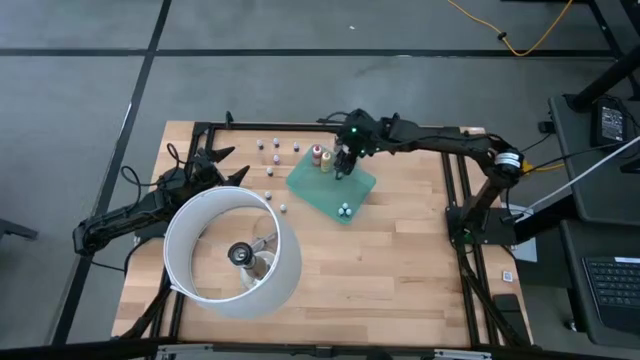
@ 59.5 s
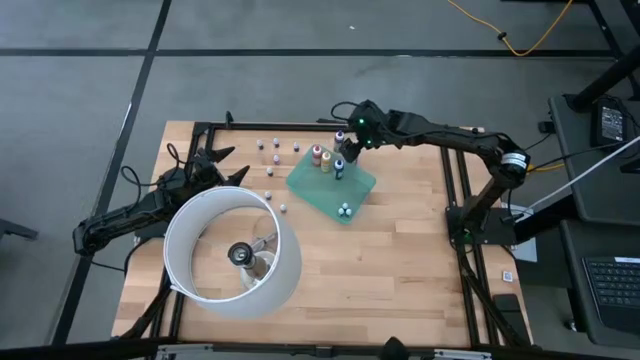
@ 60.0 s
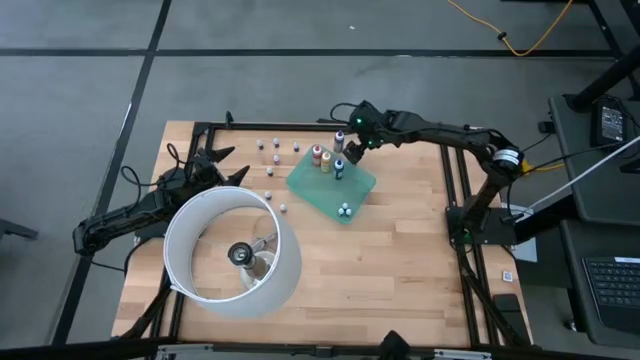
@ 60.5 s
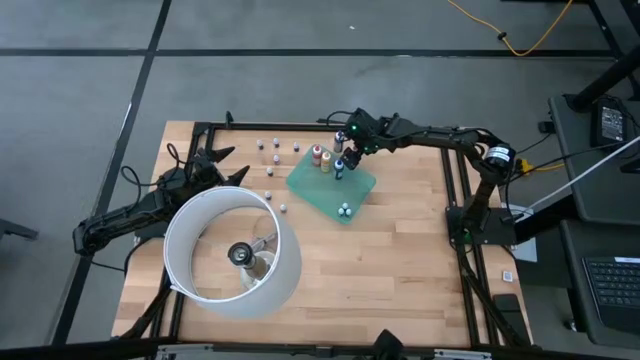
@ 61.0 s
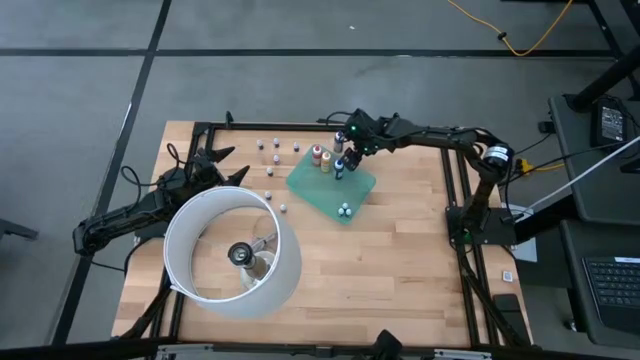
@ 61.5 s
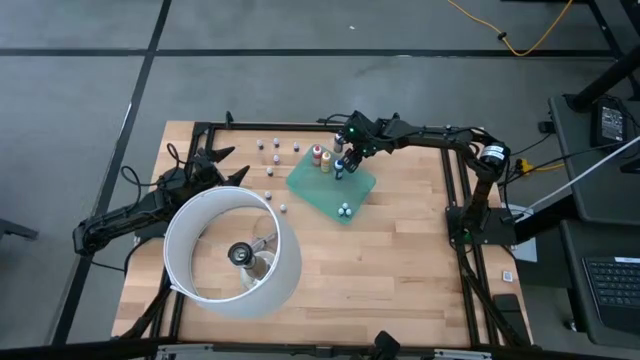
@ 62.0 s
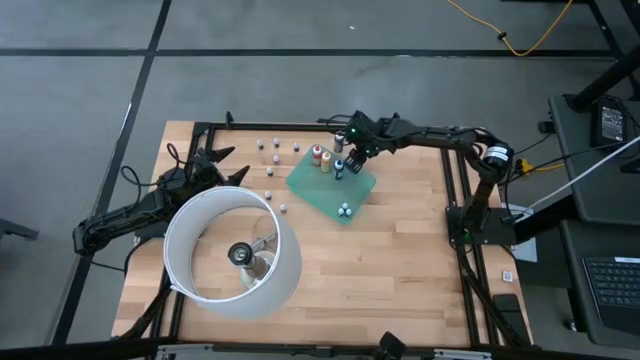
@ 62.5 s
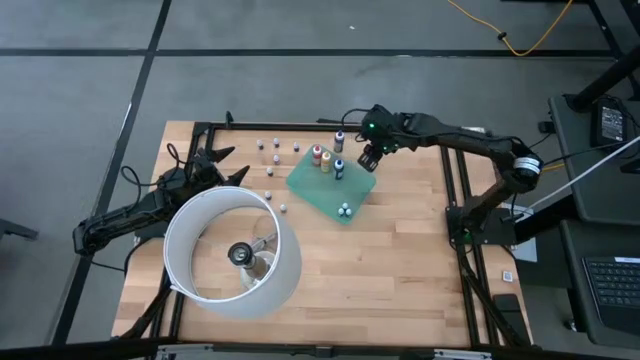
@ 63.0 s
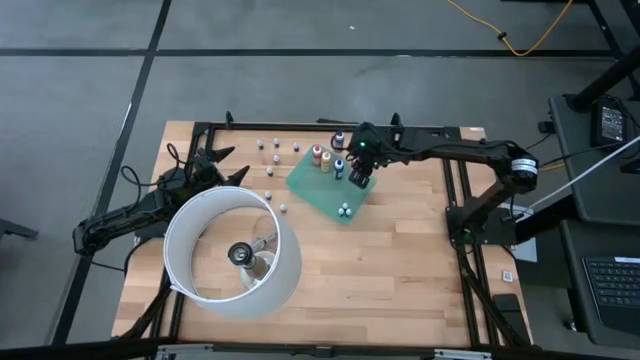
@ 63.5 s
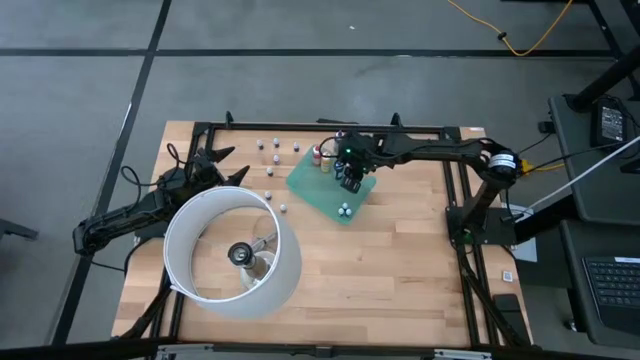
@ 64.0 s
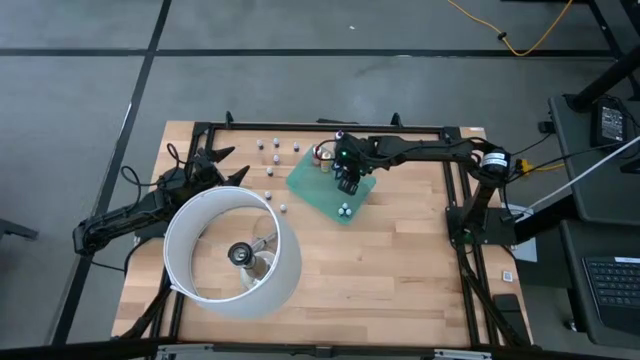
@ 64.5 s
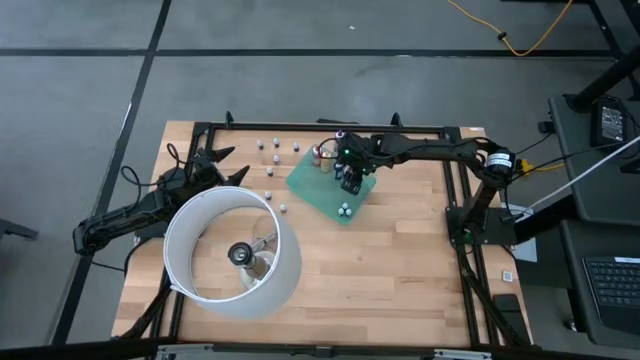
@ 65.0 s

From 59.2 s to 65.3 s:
Task: Pick & Place food coloring
Put the large red food coloring bottle into the green bin

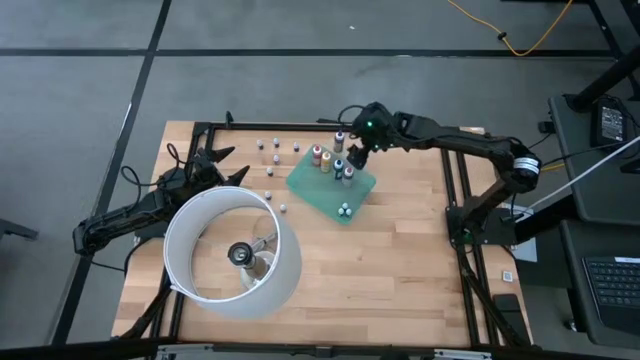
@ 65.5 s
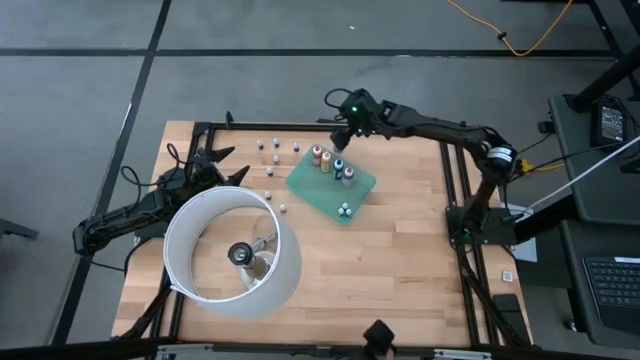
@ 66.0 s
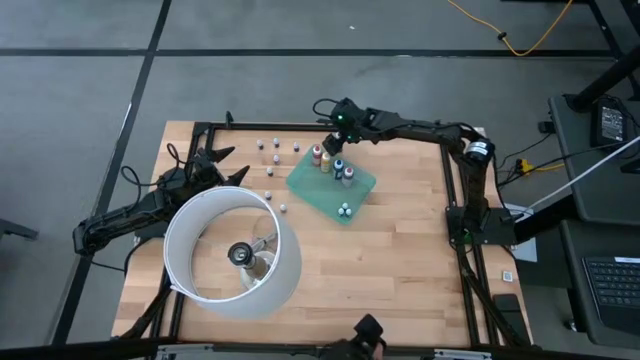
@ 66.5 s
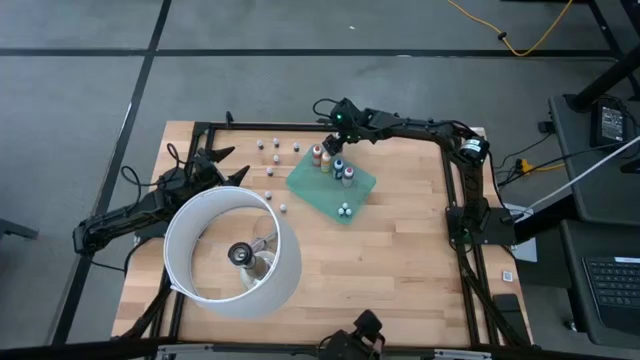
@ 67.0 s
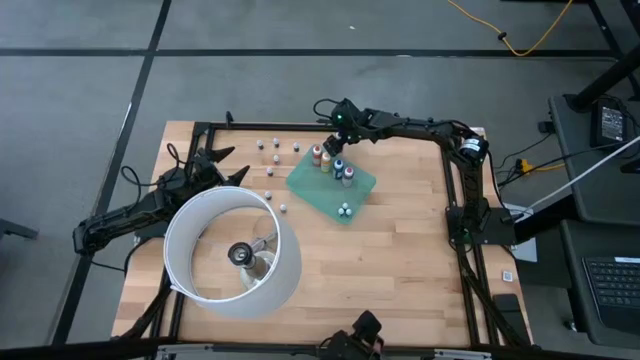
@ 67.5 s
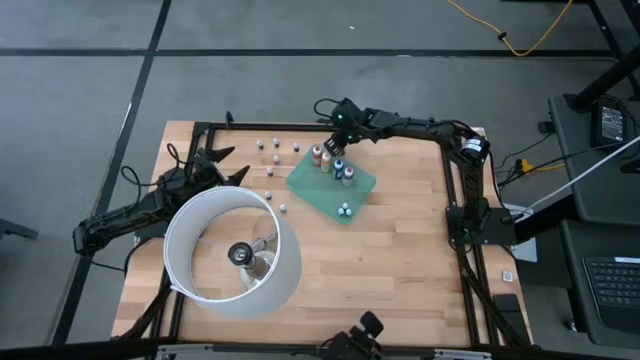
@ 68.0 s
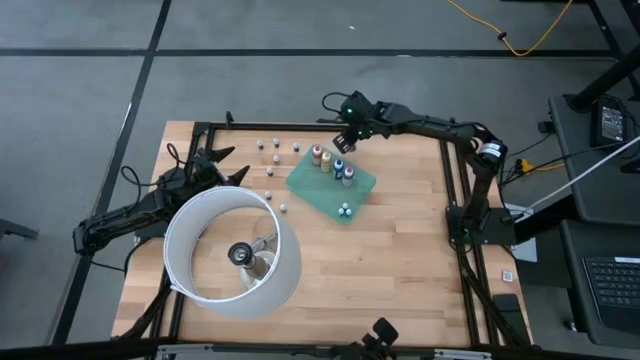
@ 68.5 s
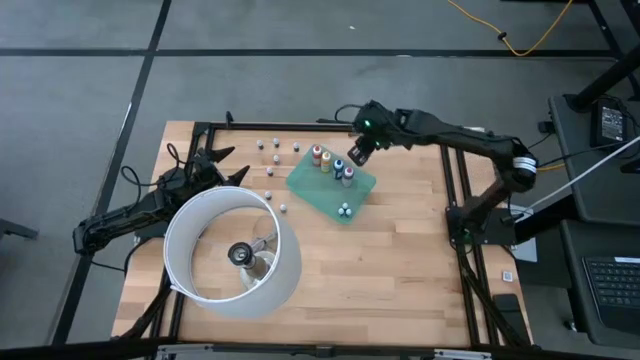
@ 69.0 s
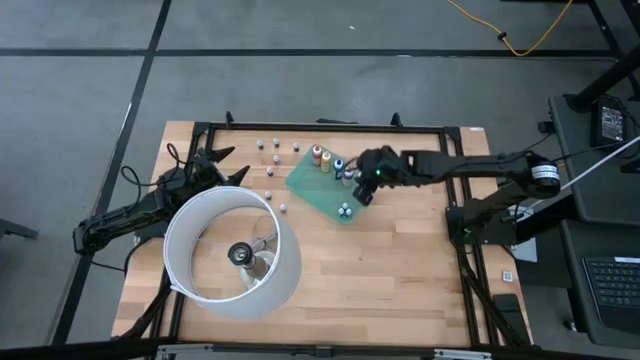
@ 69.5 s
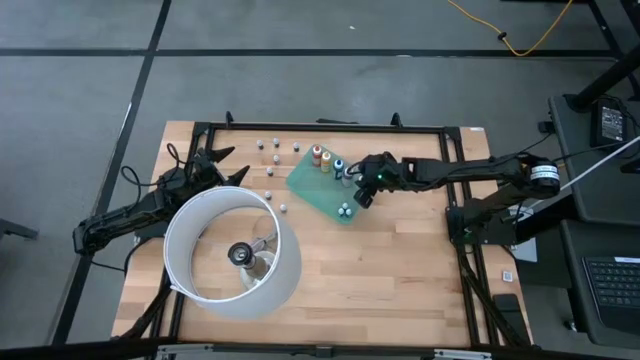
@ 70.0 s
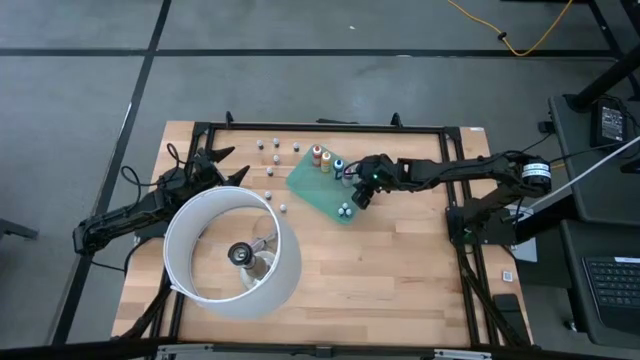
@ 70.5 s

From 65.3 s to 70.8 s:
Put the large purple food coloring bottle into the green bin

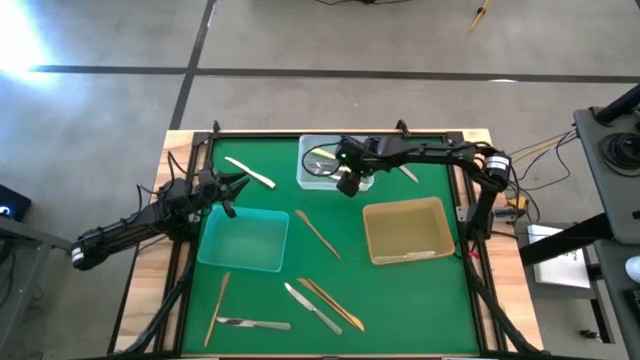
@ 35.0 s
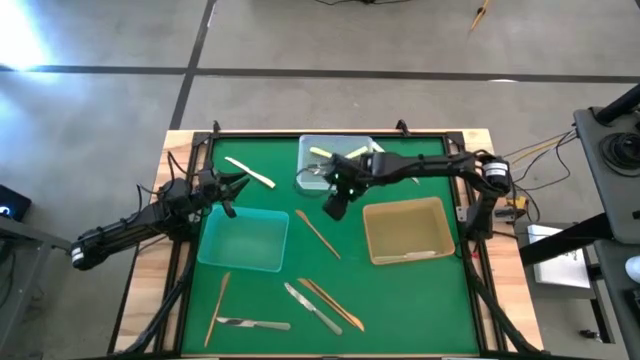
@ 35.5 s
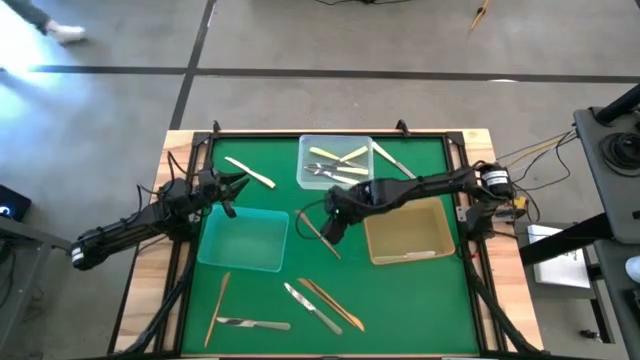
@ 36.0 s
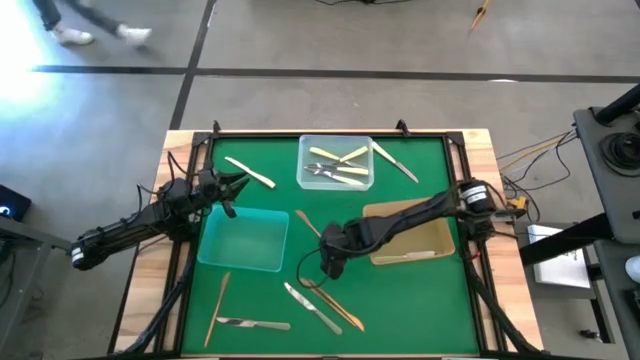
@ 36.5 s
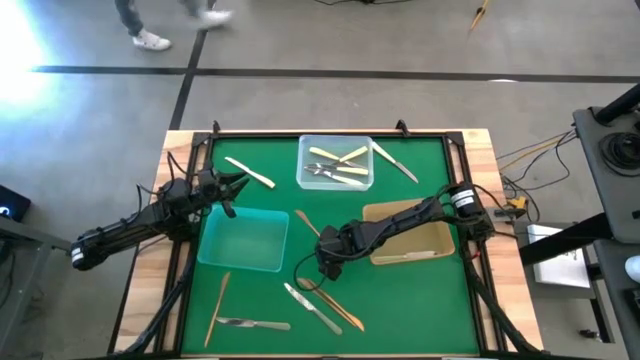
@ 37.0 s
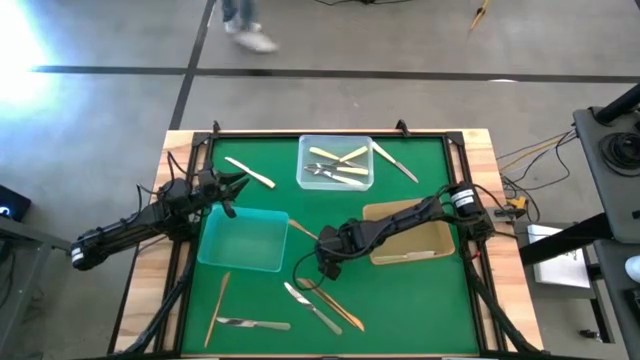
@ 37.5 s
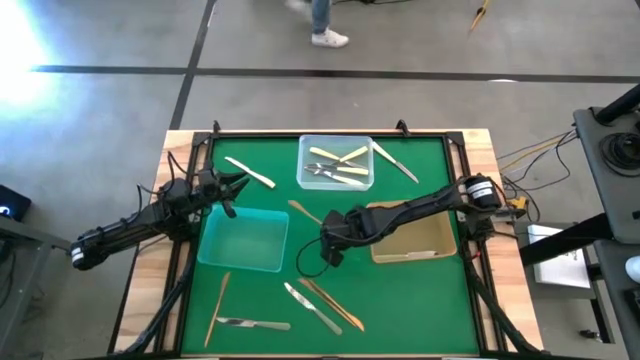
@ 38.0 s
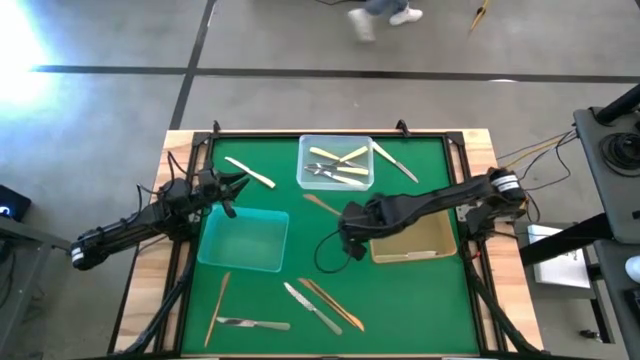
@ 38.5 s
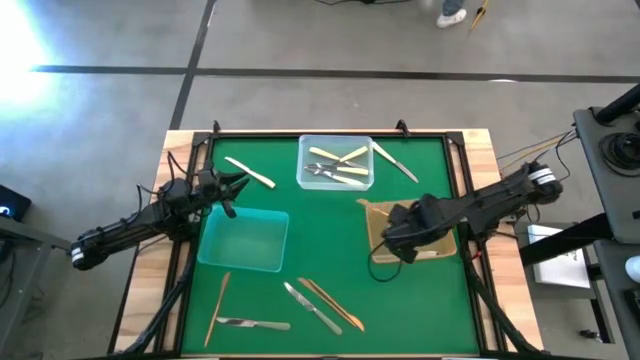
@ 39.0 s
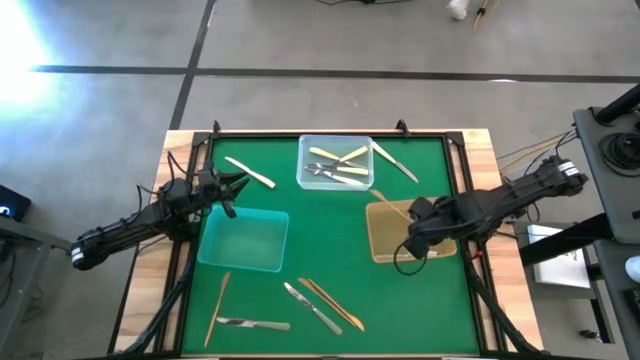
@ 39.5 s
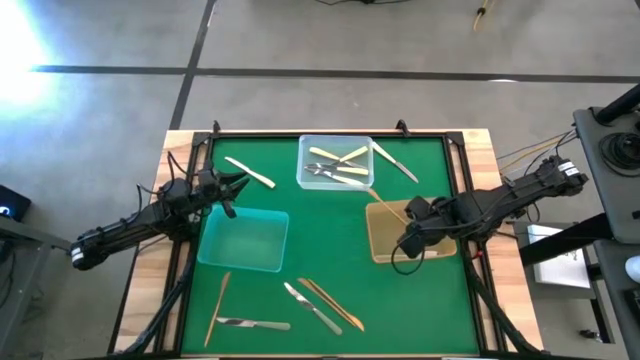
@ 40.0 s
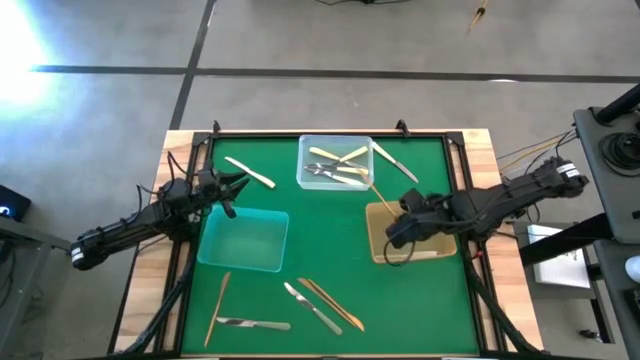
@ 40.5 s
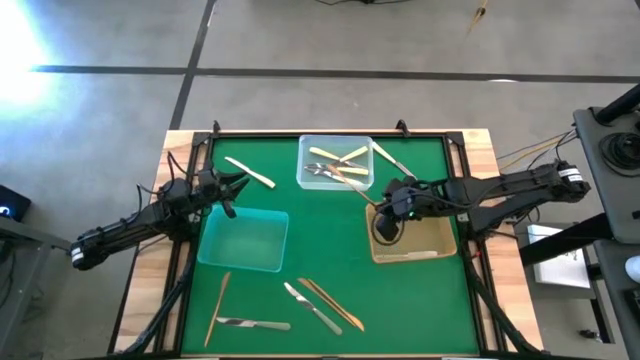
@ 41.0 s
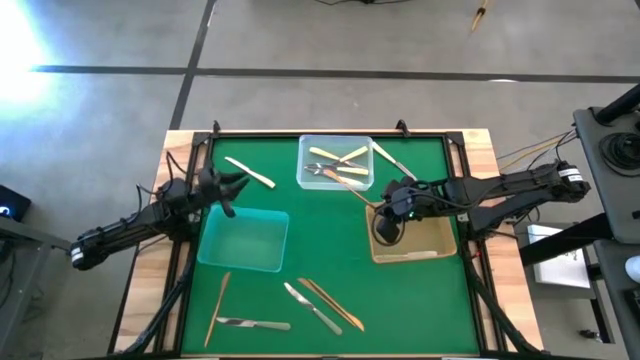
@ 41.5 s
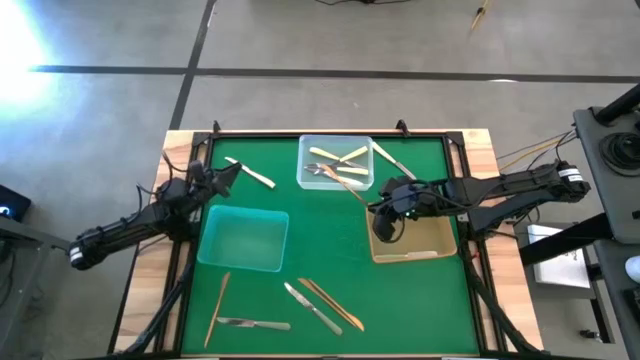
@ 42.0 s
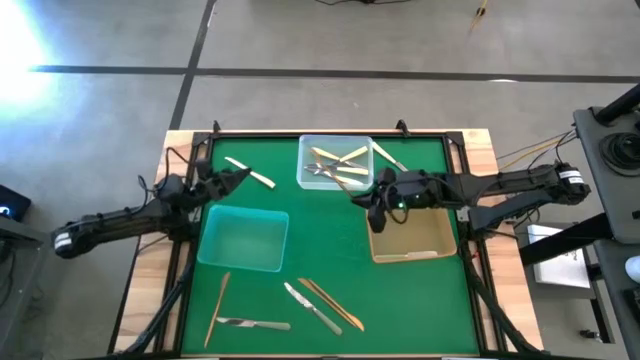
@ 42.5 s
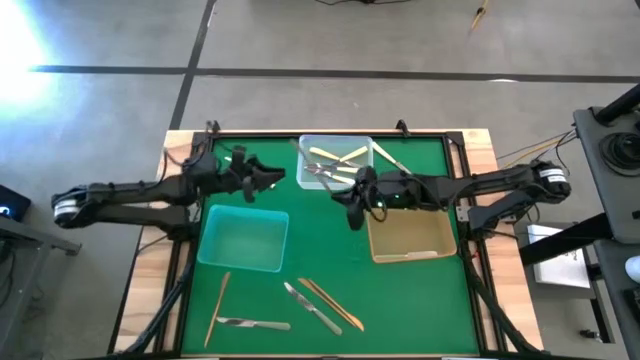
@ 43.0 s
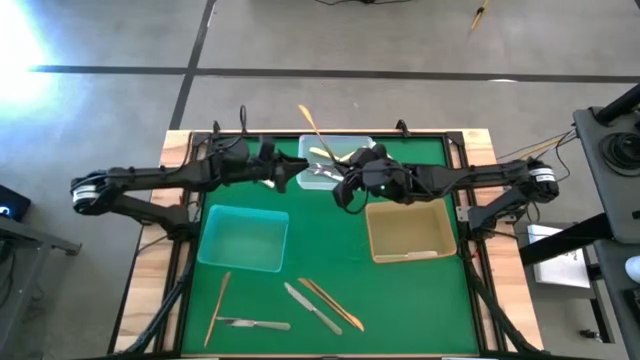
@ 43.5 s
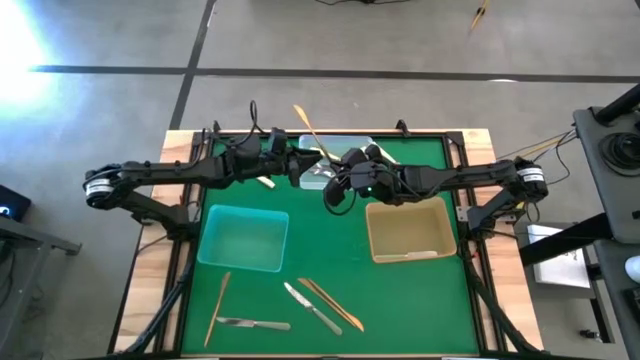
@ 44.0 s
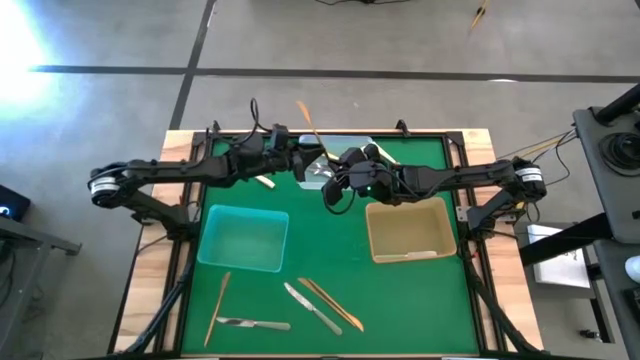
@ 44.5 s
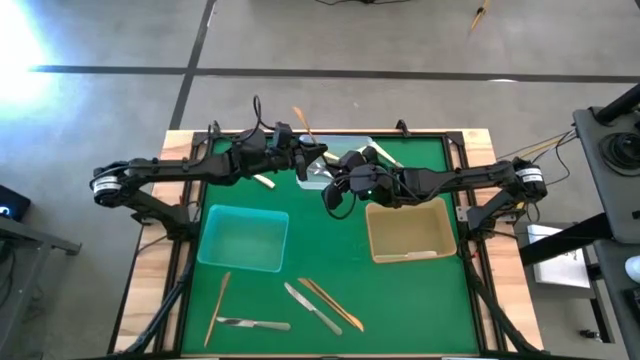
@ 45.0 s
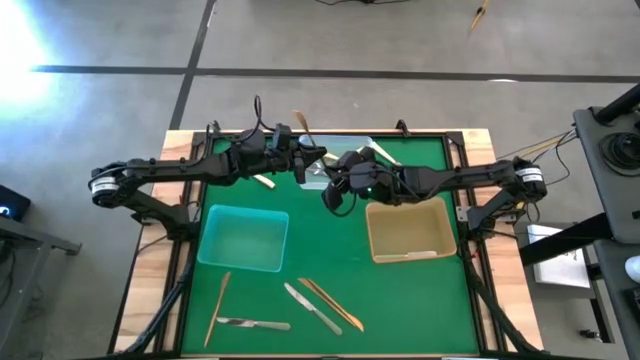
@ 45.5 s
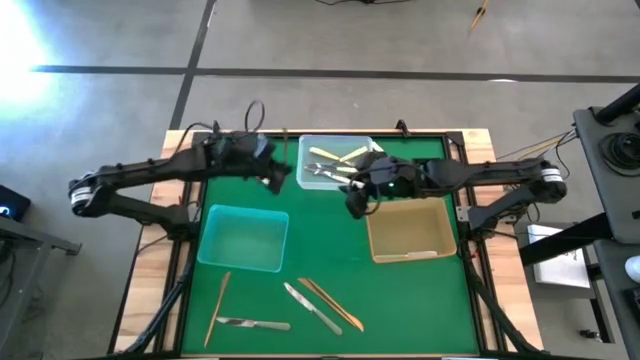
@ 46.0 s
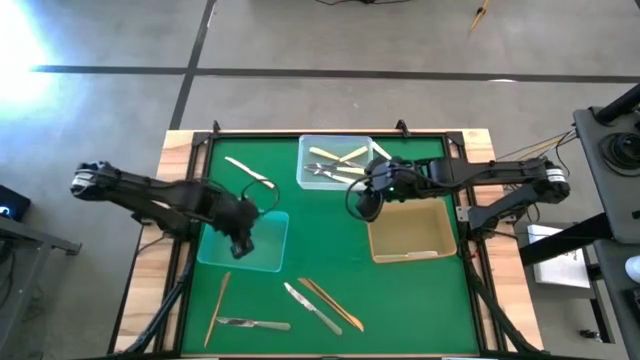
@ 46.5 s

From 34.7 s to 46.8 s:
Task: Sort silverware by color (type)
Put the gold knife into the blue bin
